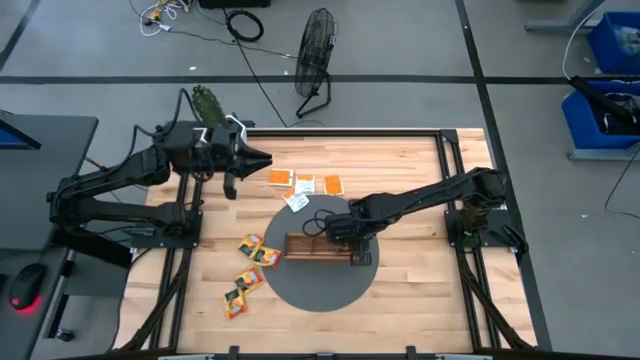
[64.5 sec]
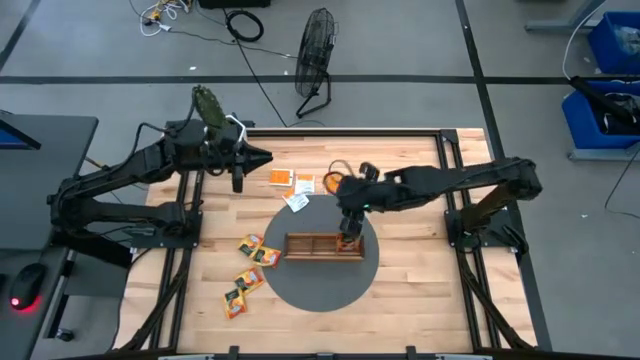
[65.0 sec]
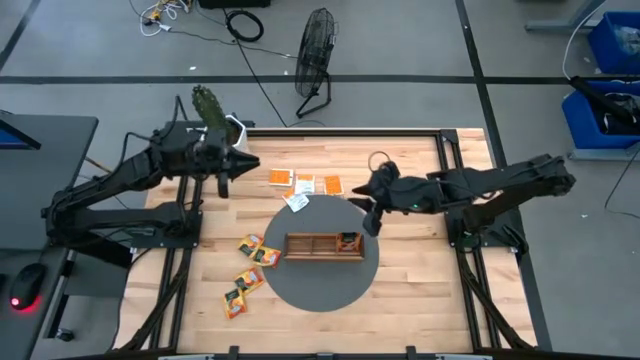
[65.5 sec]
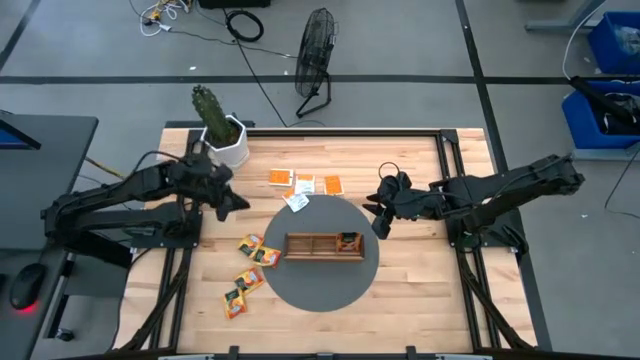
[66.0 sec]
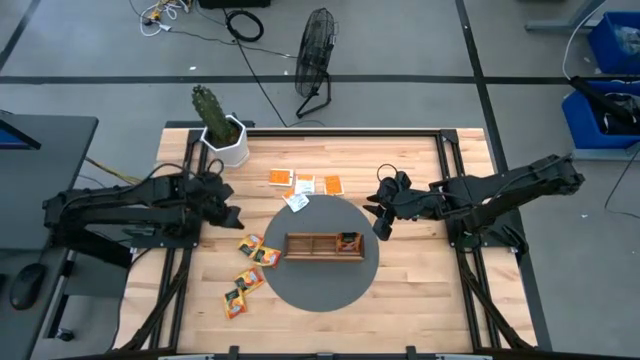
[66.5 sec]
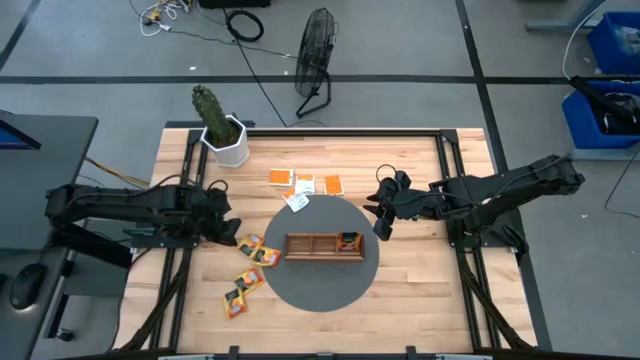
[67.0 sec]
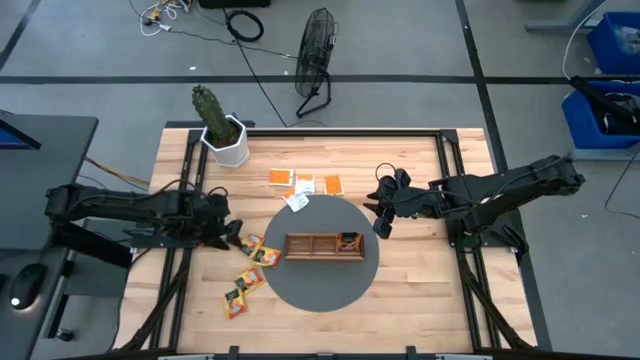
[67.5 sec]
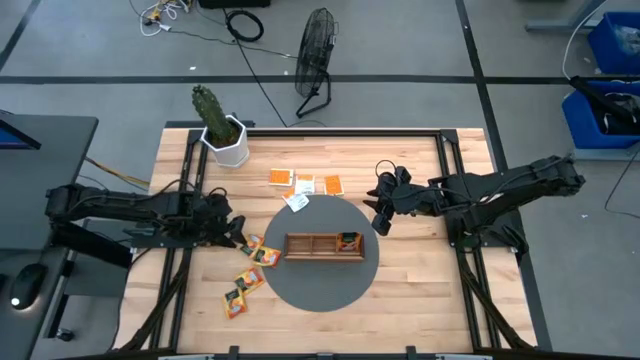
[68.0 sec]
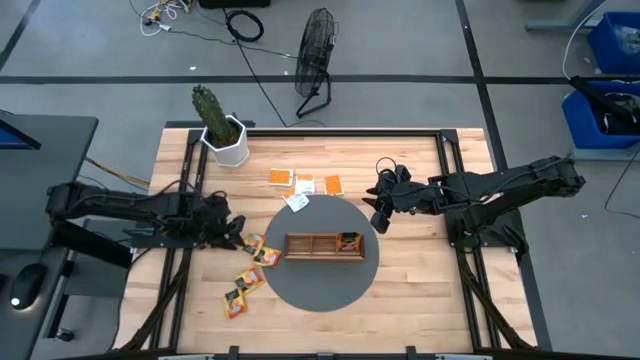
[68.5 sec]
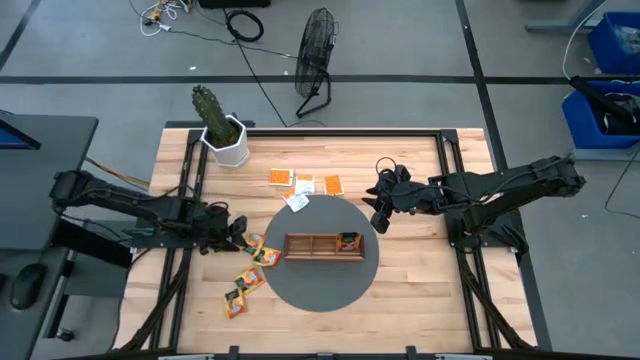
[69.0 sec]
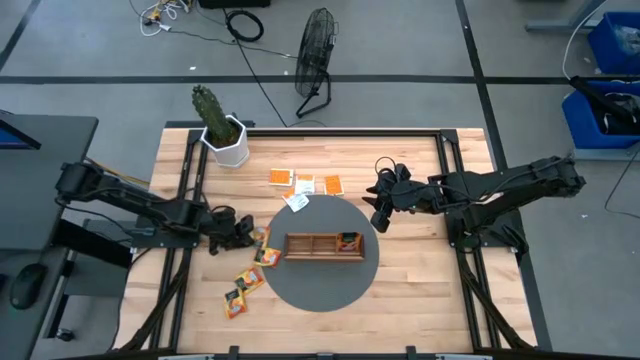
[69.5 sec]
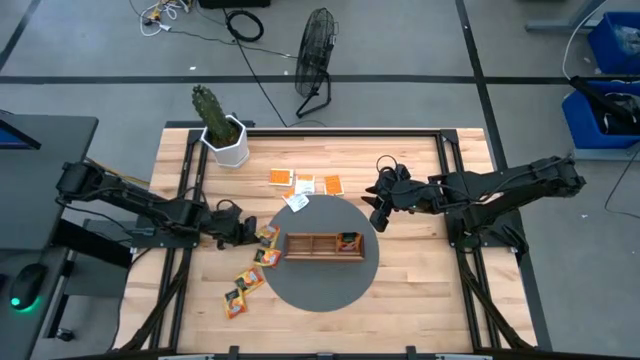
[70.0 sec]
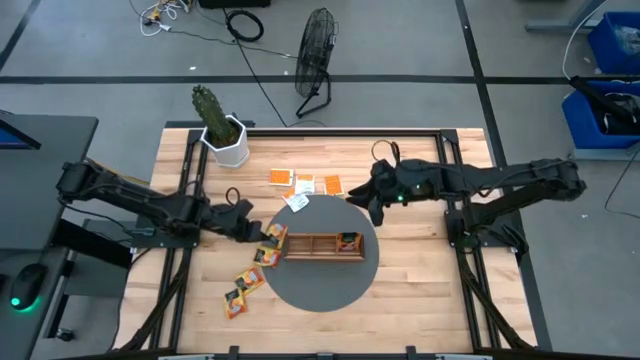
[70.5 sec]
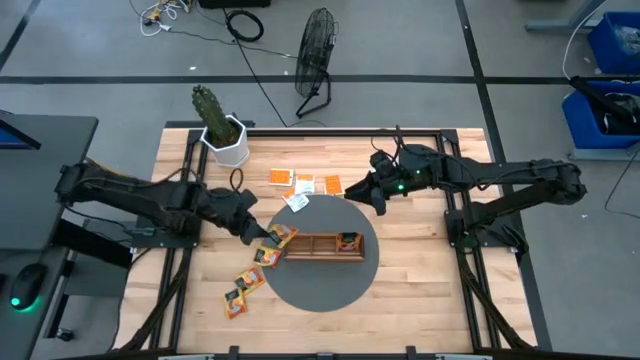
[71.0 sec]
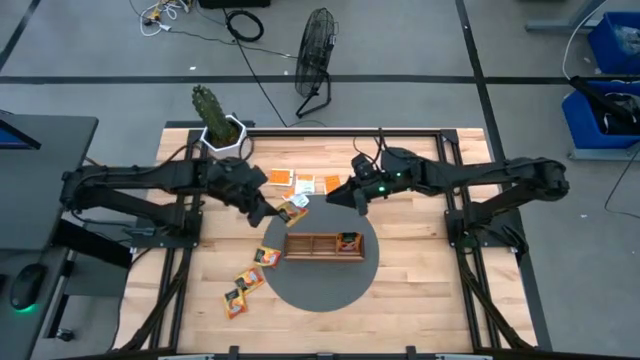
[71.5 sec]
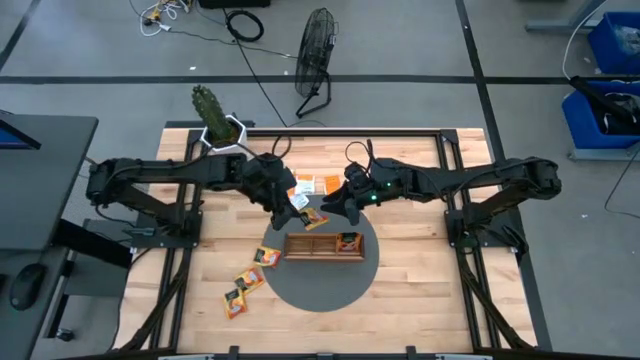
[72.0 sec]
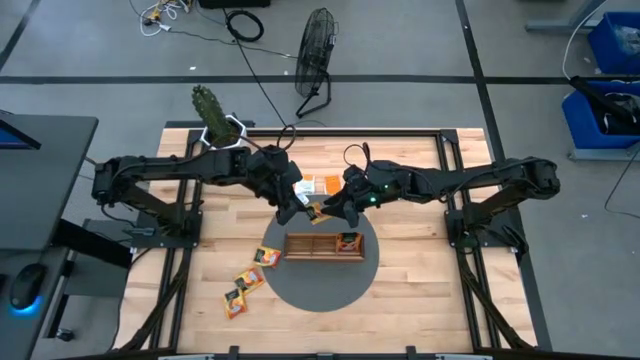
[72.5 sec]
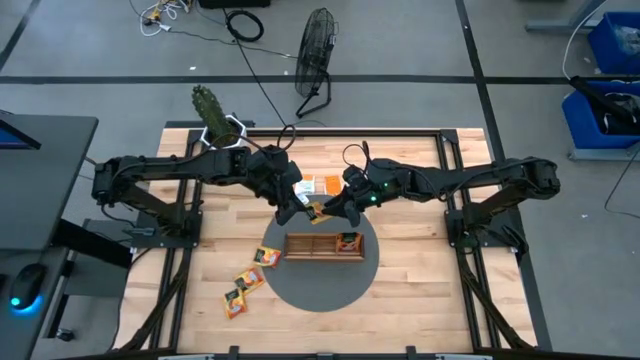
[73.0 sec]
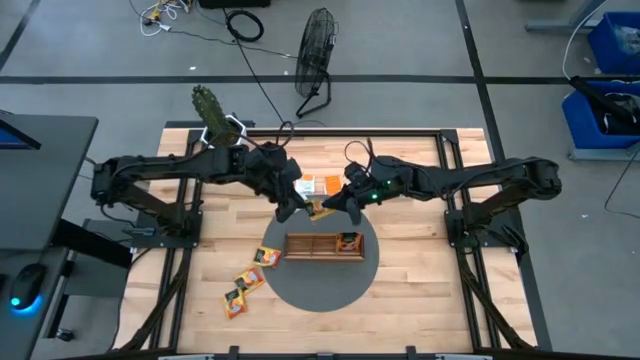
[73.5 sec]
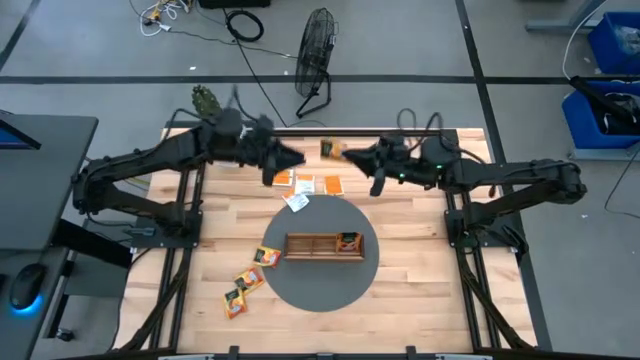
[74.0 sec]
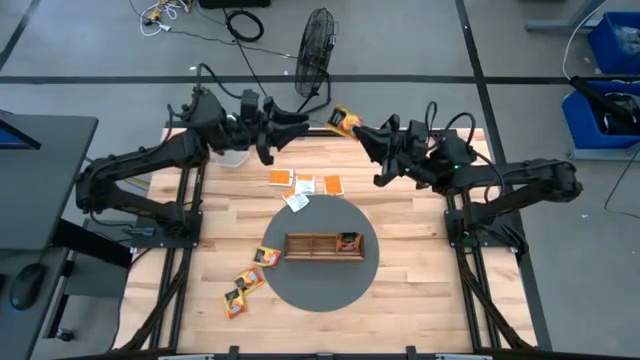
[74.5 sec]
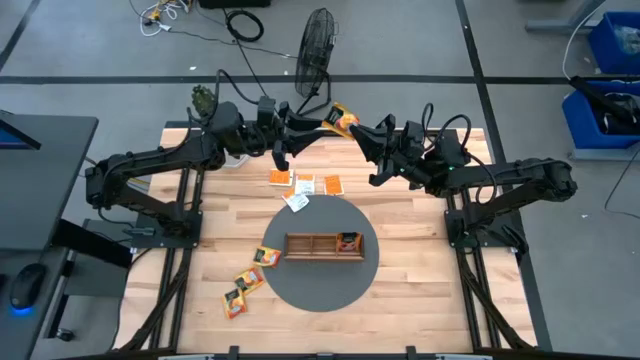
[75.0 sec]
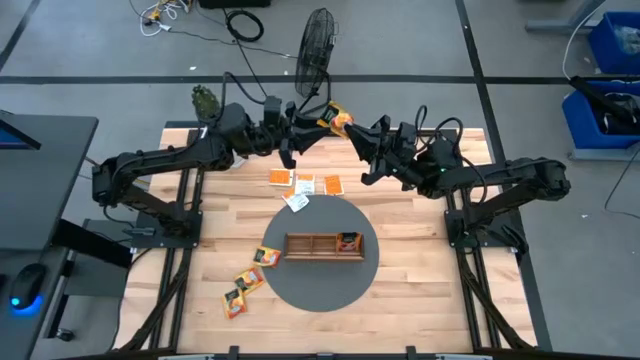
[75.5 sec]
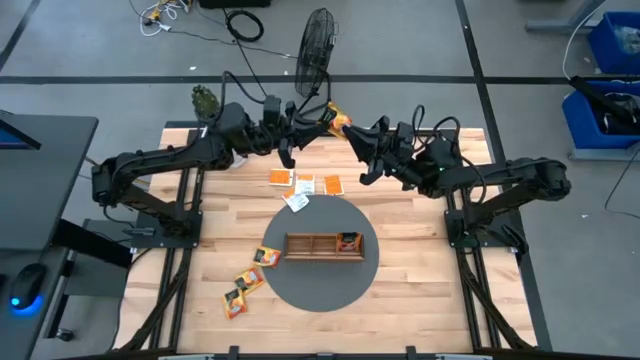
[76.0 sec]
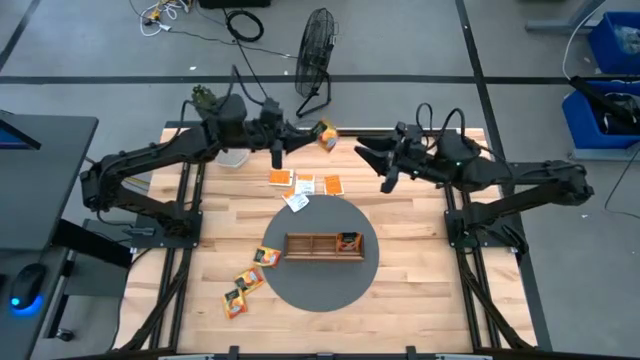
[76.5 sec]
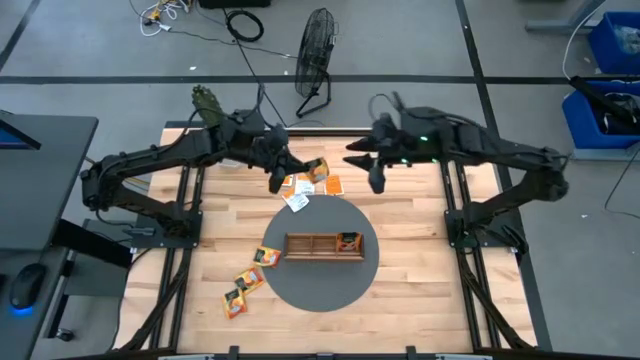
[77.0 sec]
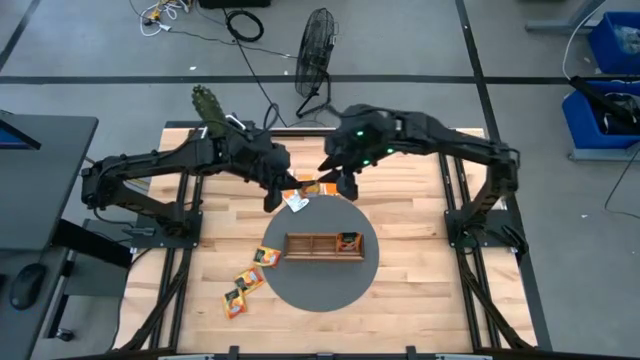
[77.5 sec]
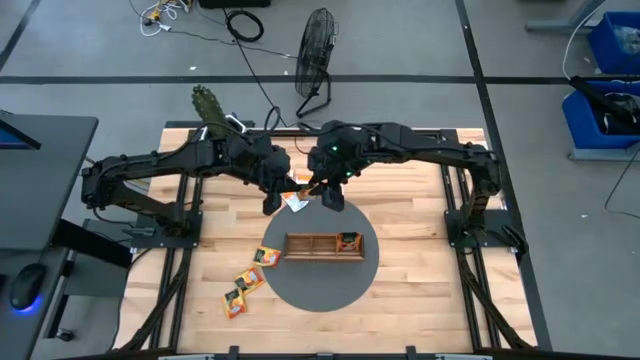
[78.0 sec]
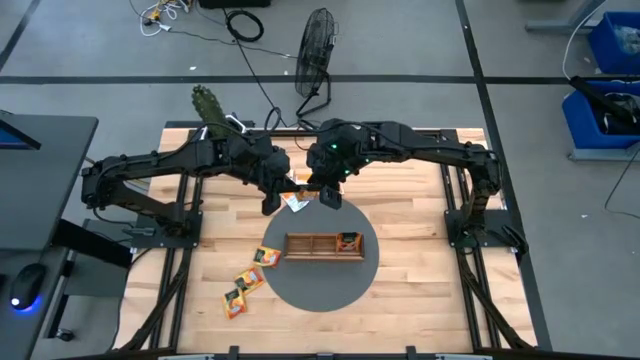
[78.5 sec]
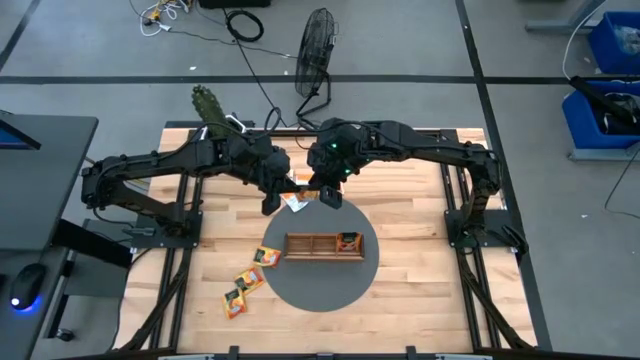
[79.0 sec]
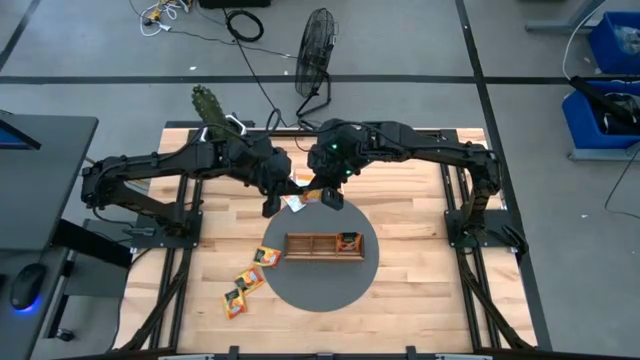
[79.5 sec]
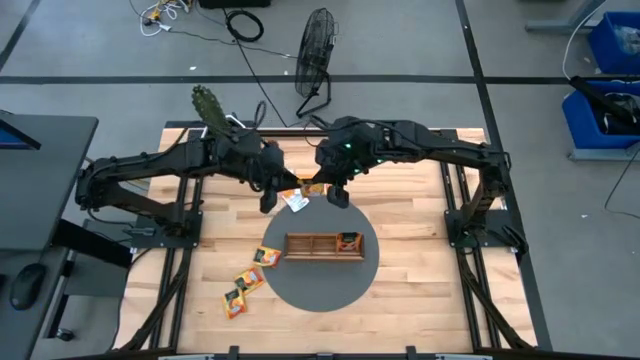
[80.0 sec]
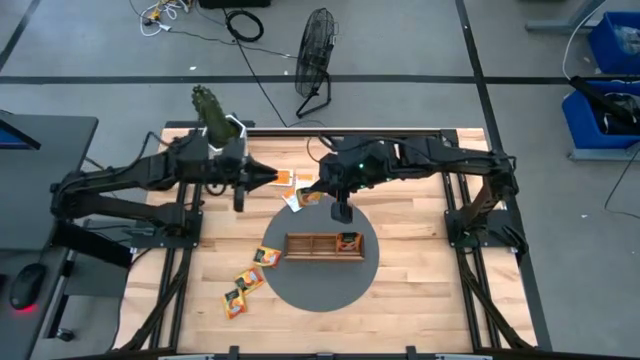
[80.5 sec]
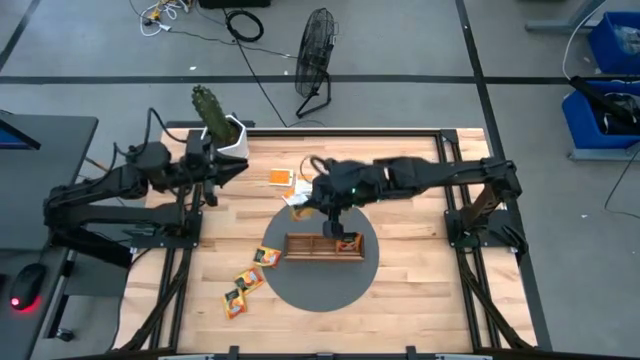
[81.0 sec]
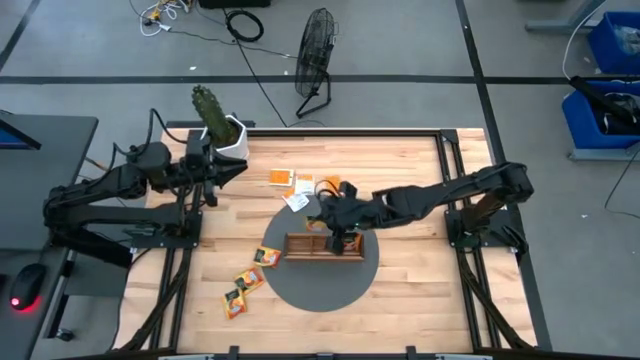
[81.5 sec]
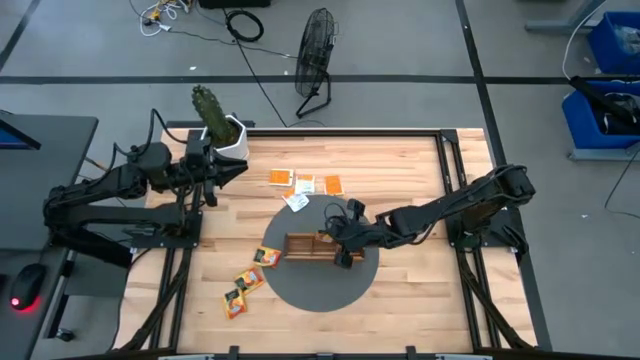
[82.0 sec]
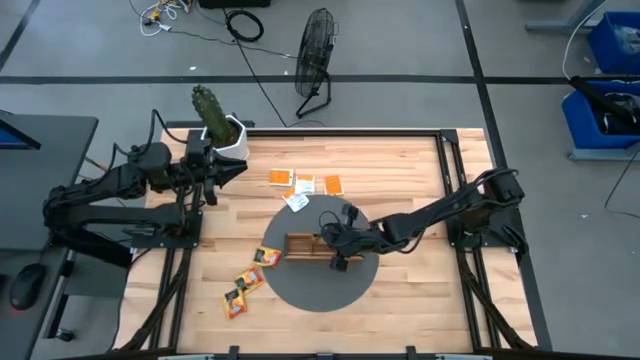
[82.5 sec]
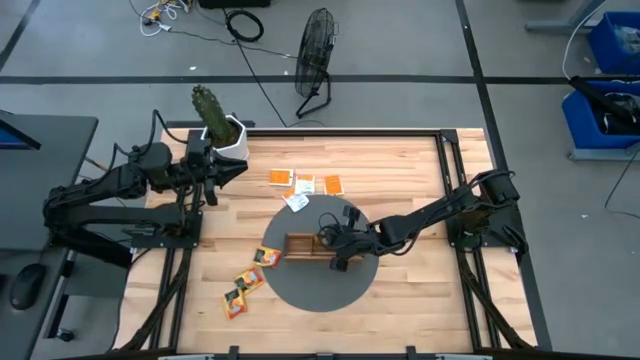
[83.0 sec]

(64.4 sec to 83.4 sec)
Task: Pick & Place Tea
Put the yellow tea bag into the middle section of the wooden organizer

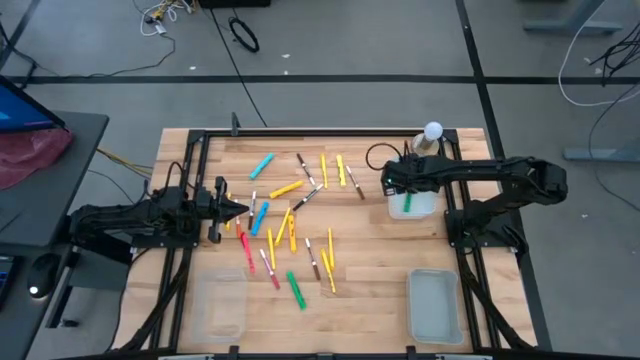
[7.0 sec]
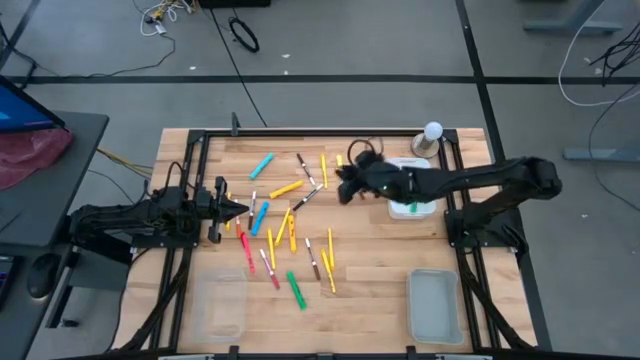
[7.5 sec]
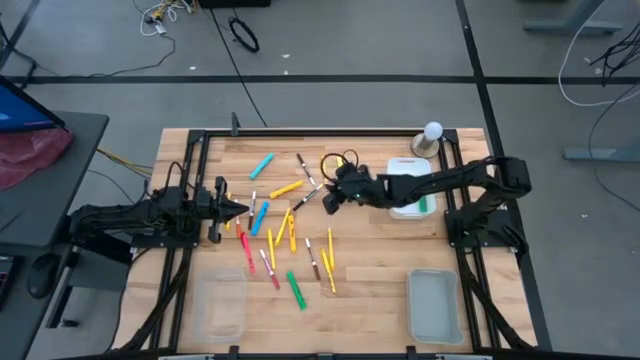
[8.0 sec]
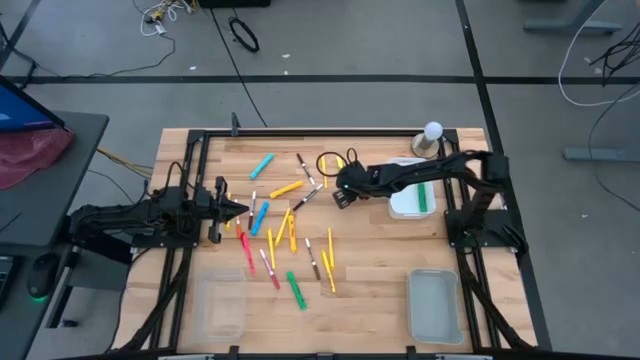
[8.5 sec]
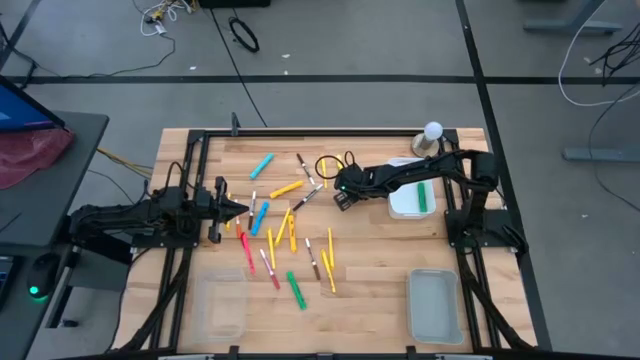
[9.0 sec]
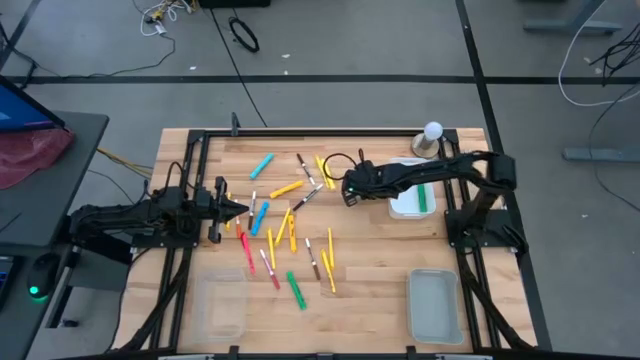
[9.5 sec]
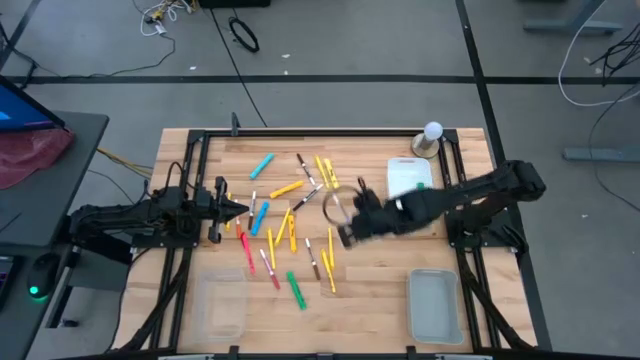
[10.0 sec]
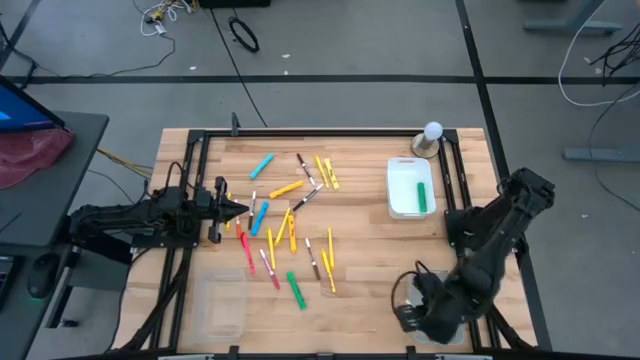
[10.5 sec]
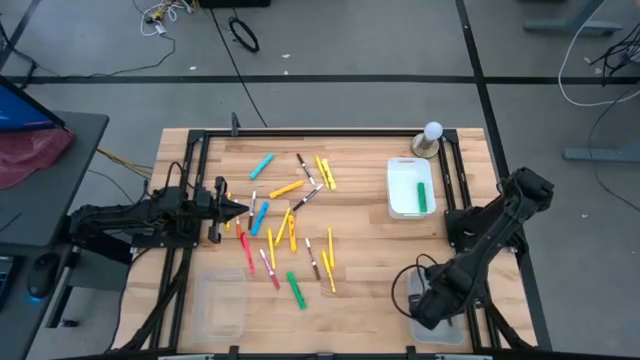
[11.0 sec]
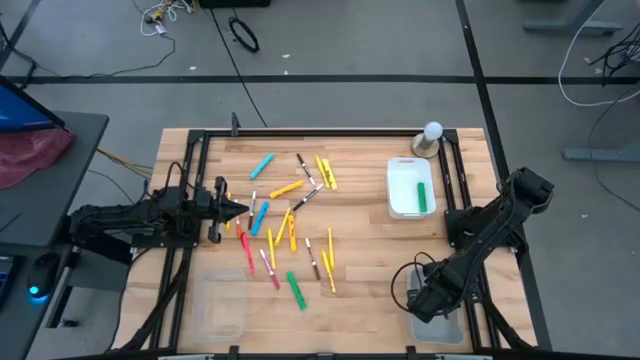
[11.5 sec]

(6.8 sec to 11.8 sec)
Task: Pick & Place Markers
Put the brown marker into the gray bin
